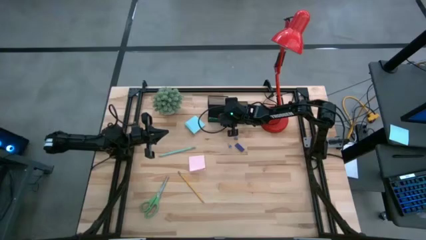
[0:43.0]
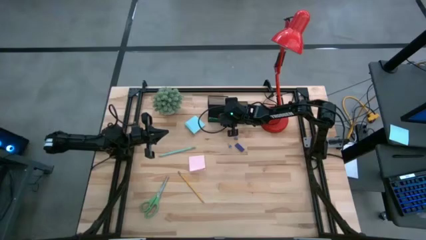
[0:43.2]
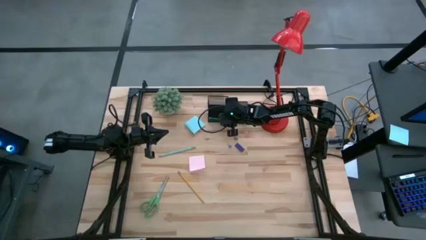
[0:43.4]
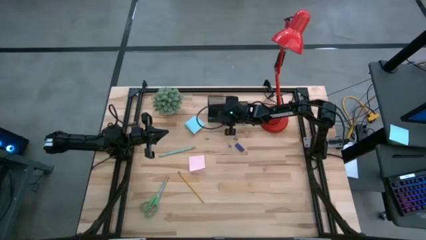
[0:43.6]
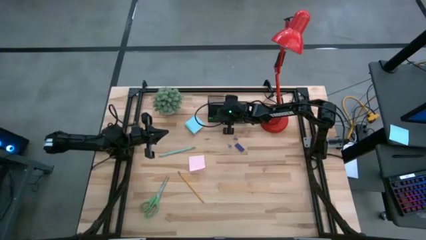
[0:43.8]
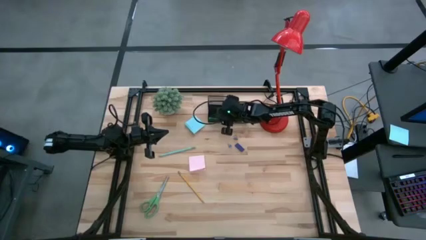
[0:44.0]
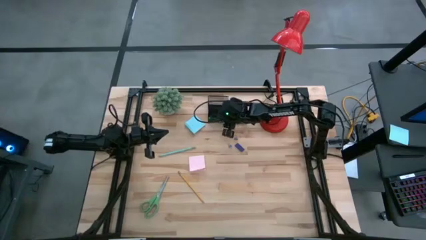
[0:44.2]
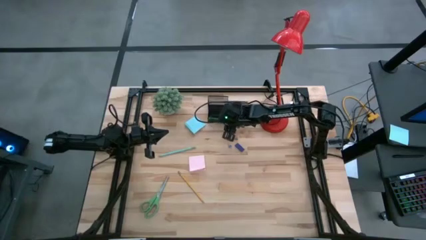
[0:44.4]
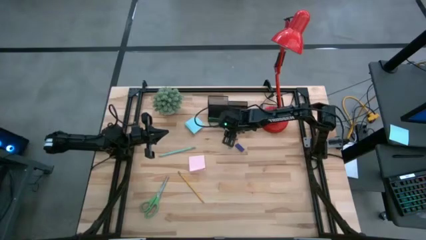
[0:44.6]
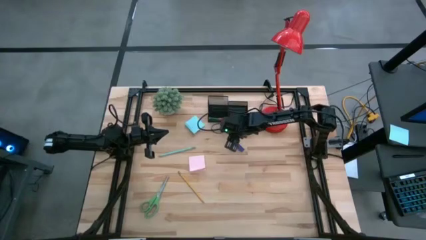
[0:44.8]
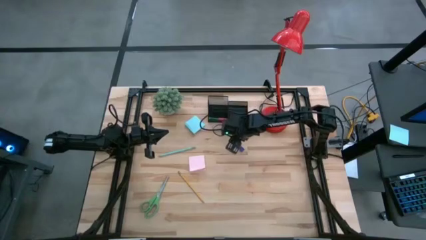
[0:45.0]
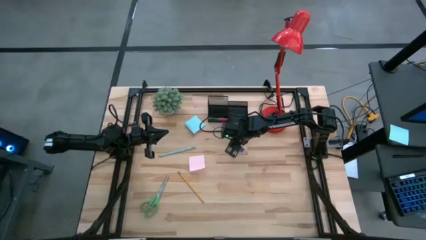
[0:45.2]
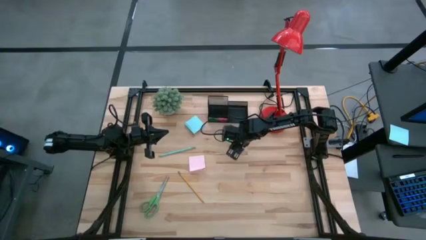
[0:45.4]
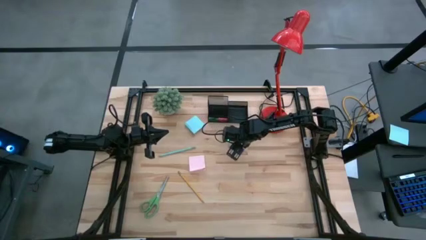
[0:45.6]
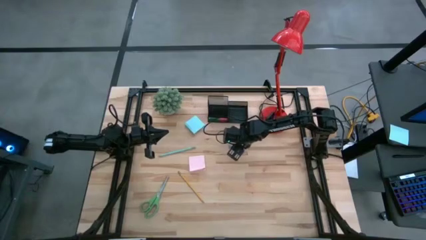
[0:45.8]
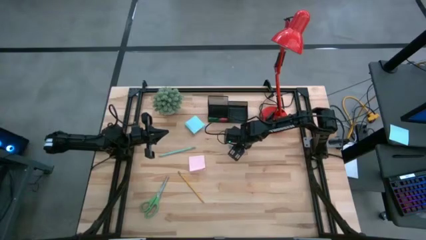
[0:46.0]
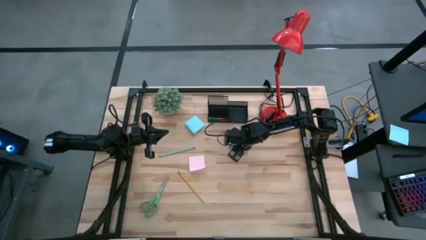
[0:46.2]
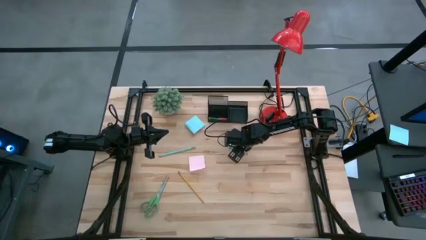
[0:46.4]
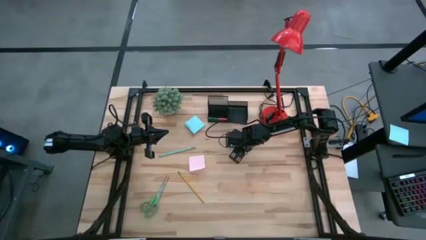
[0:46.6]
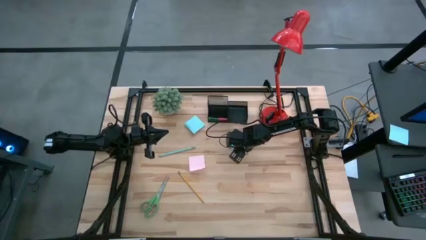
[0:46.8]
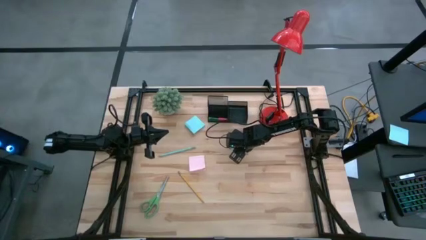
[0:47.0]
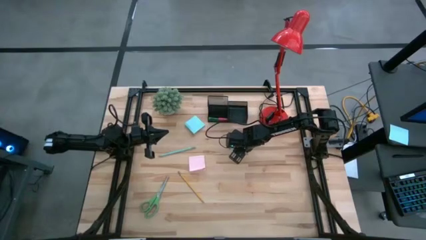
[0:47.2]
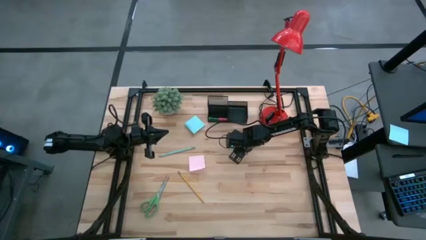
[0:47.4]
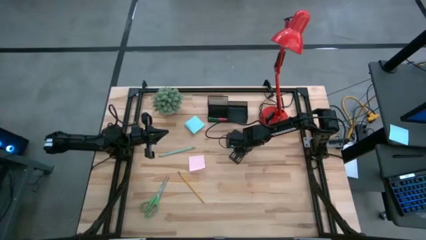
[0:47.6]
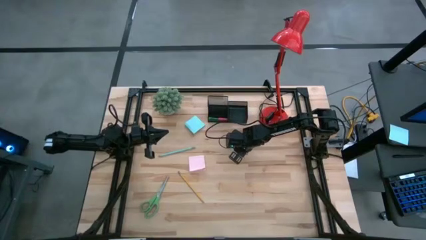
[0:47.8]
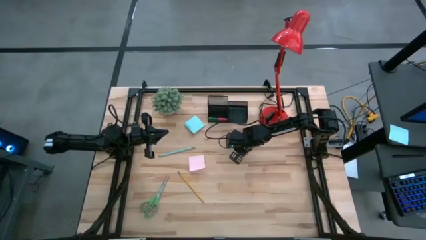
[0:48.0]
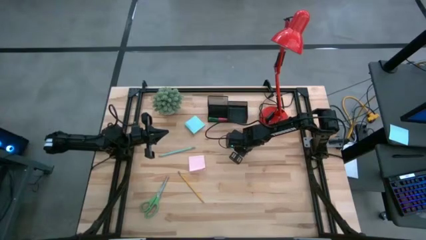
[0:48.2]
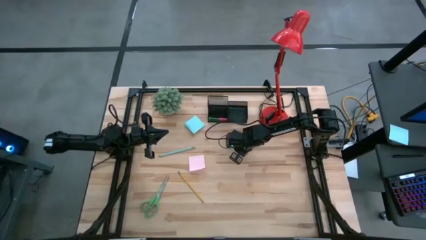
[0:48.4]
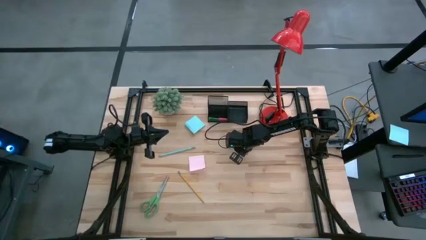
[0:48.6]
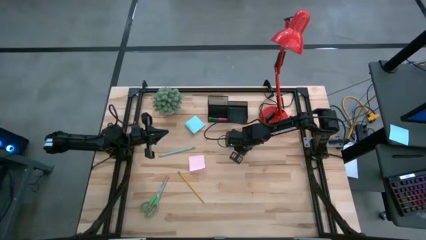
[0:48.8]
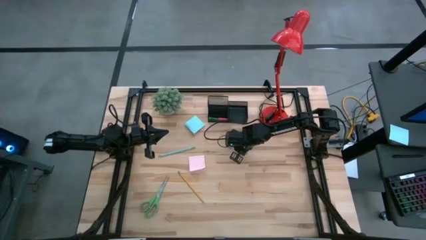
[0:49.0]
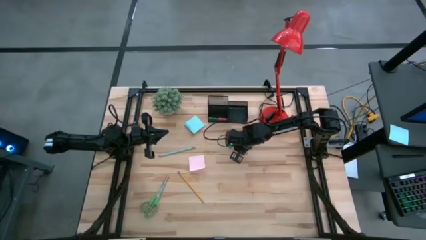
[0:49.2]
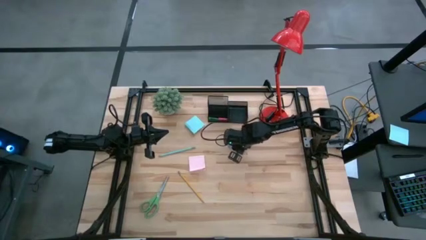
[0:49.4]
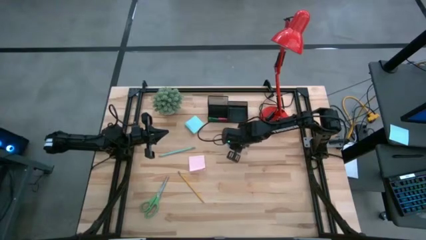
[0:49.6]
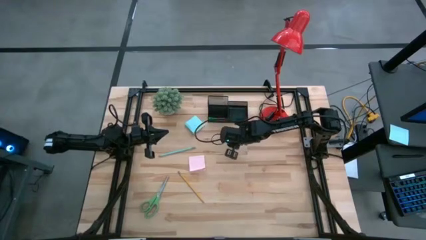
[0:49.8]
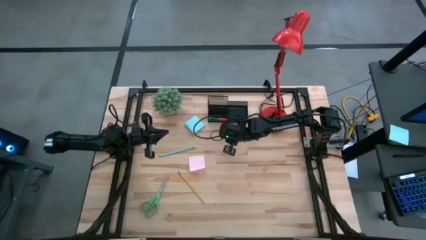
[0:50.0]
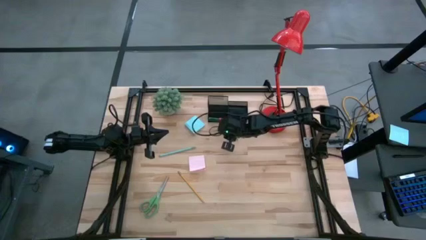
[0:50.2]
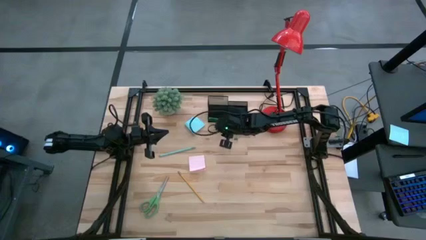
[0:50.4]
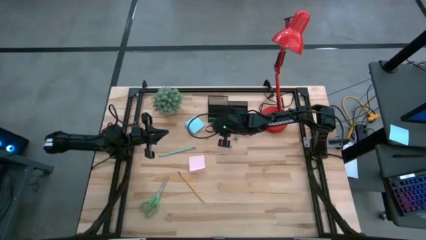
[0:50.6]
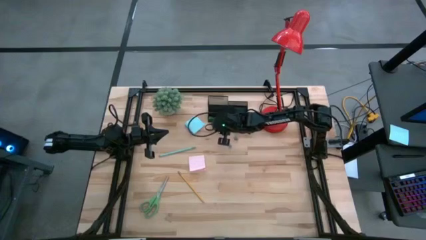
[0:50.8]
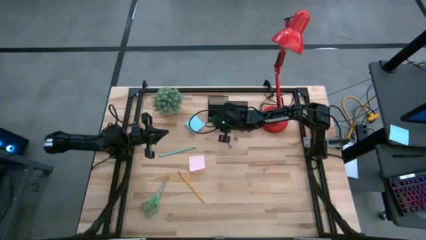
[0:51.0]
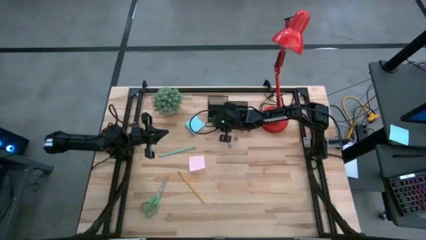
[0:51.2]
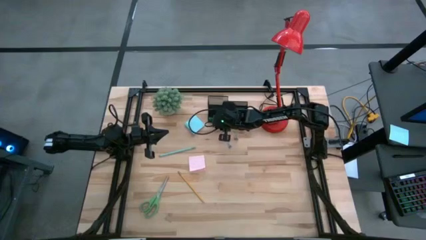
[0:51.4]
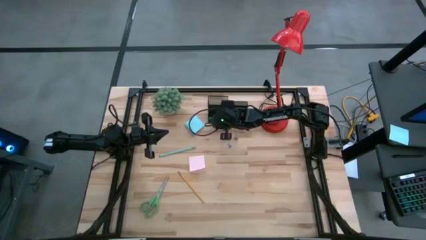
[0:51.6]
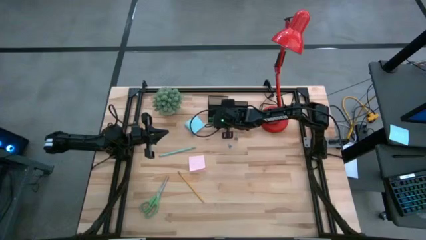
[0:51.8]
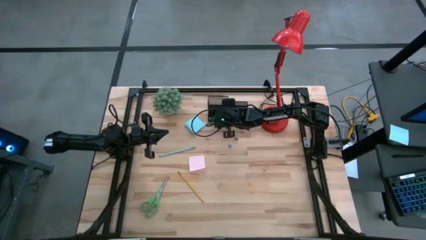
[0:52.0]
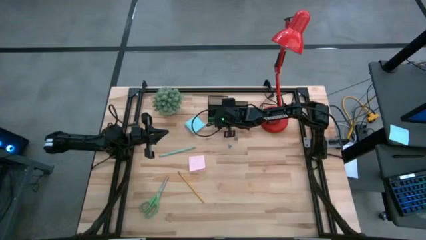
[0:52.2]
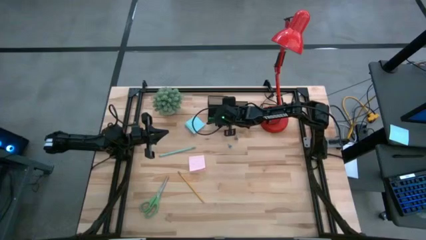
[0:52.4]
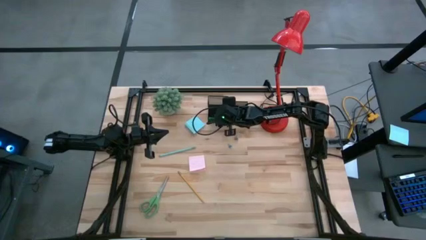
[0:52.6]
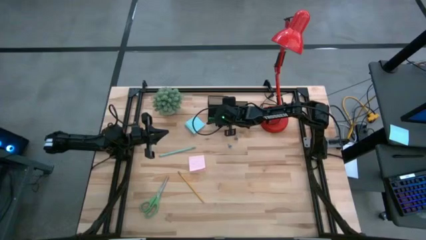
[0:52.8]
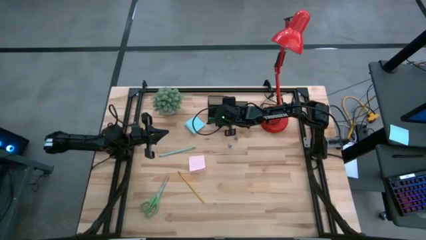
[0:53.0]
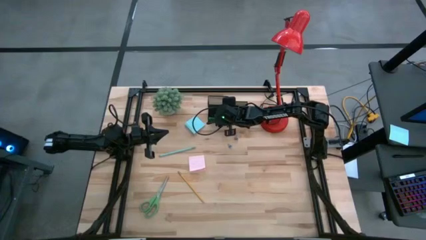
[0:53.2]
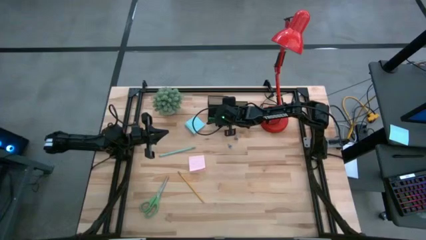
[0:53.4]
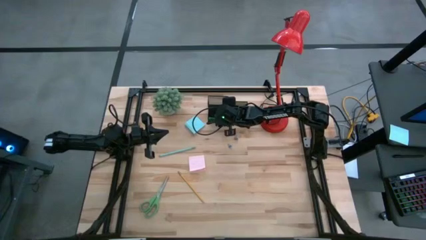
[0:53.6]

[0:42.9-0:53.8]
Task: Pick and place office supplies into organizer
Put the dark blue eraser into the desk organizer
